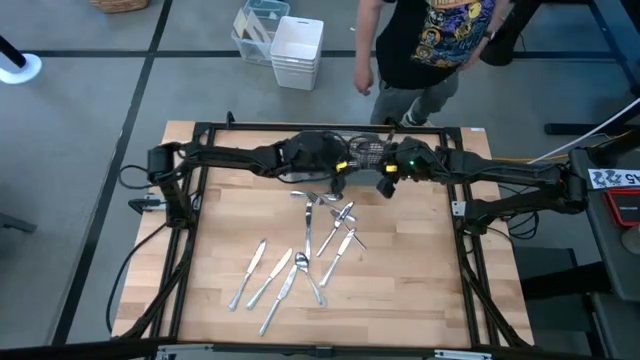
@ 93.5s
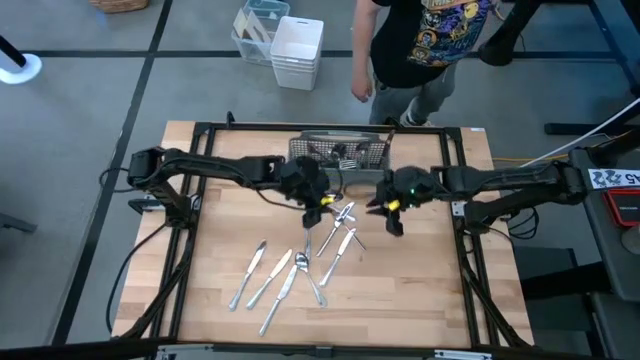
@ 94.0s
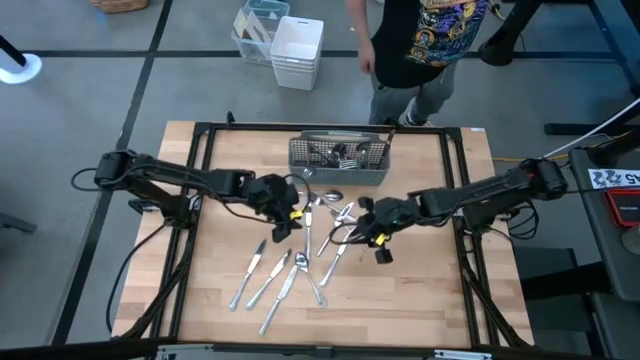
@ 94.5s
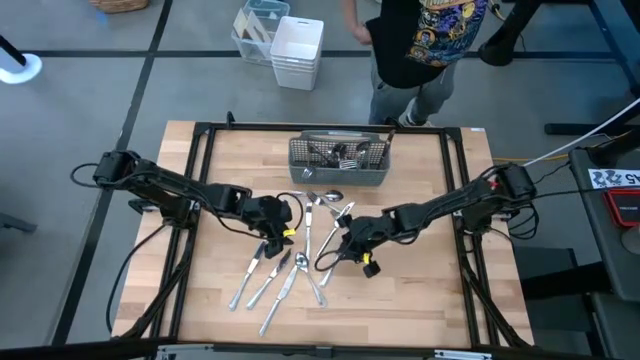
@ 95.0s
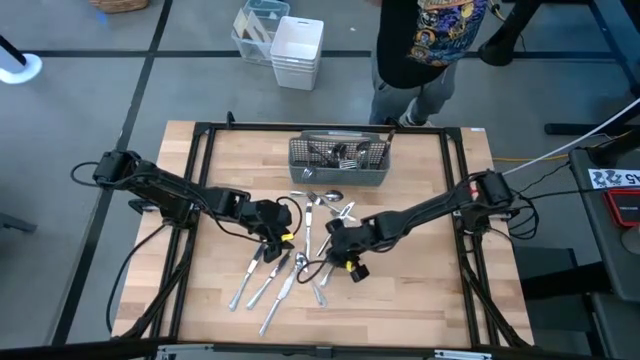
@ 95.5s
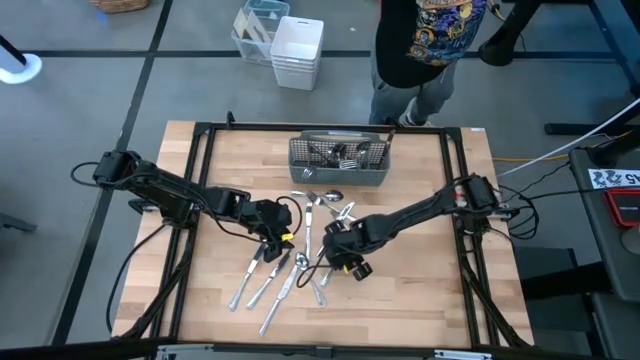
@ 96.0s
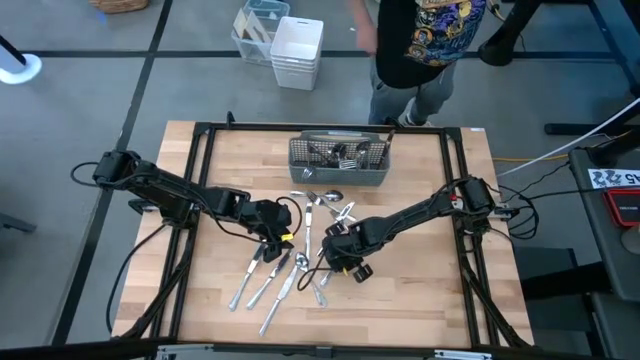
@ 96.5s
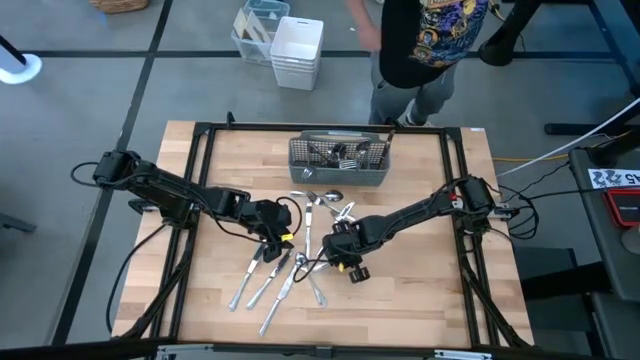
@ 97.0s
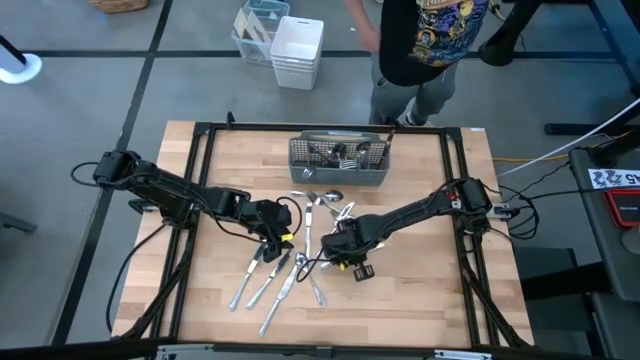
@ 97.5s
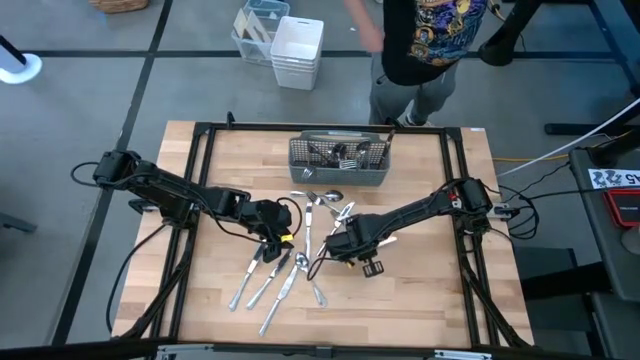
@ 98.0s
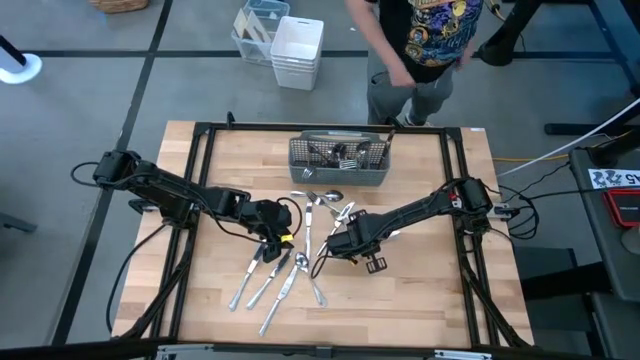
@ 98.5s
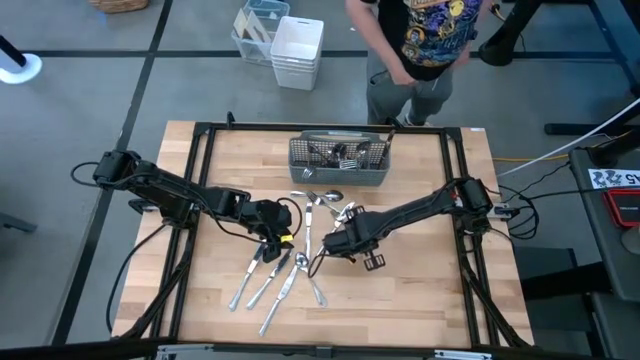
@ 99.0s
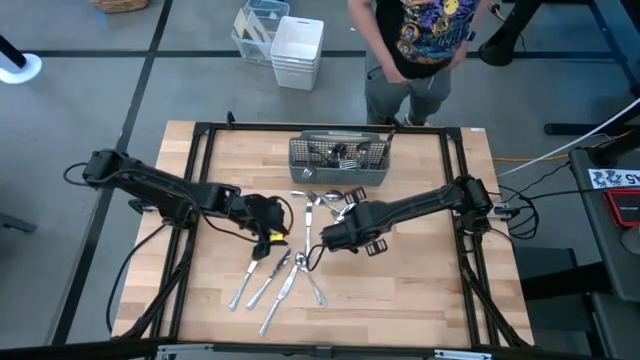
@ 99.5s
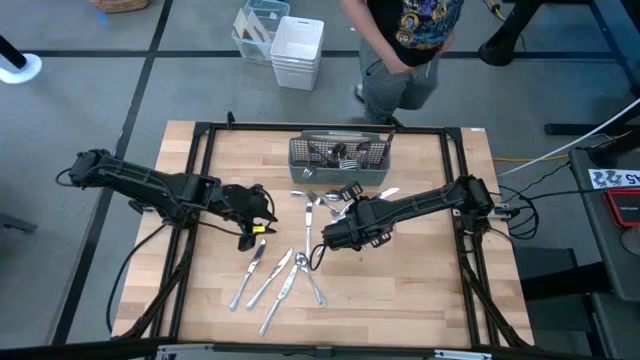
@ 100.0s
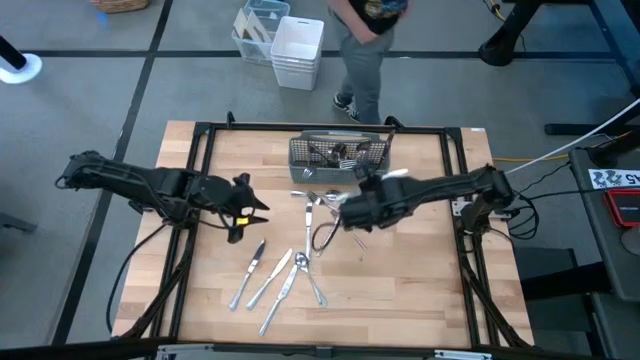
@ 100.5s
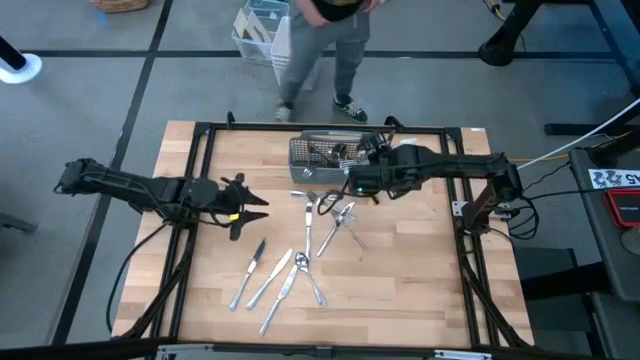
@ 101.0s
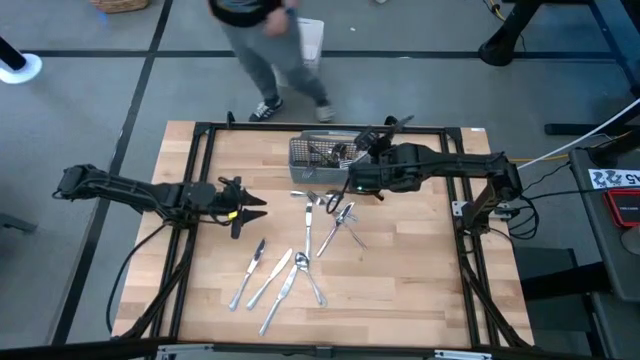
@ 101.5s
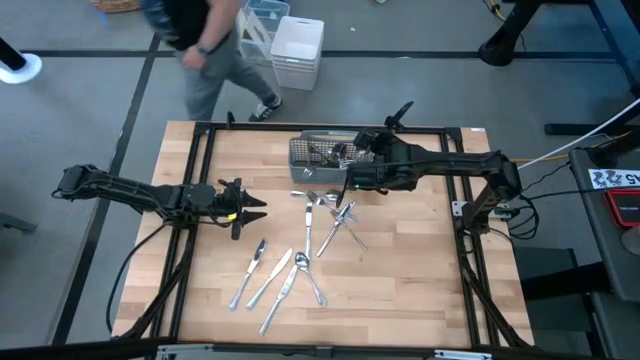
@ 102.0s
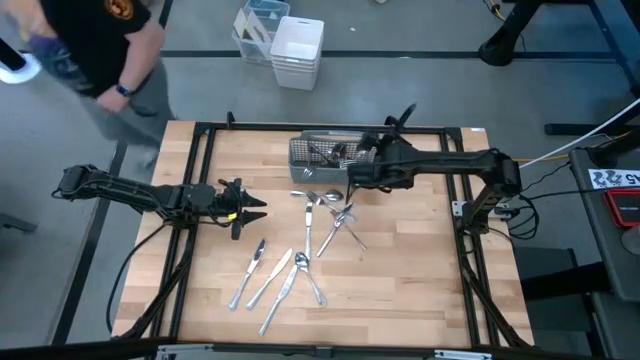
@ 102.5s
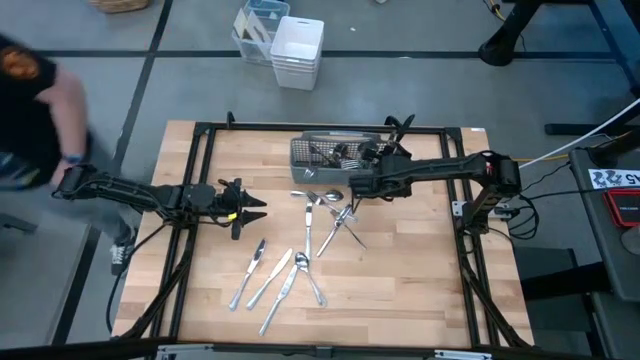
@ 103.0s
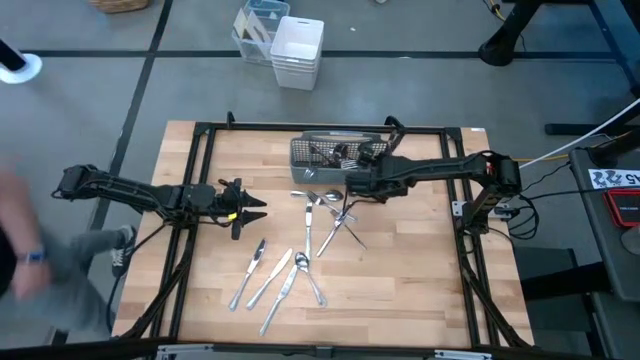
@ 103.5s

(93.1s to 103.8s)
Task: Sort silverware
Put the knife into the silverware rack

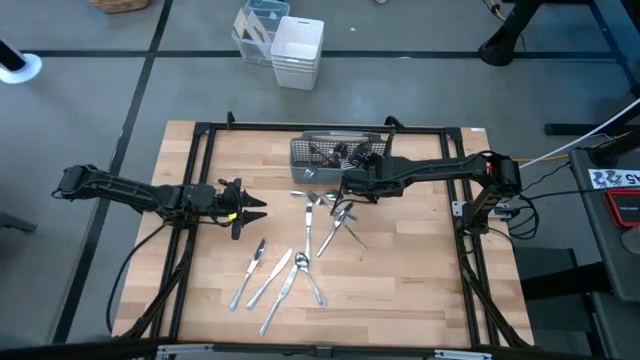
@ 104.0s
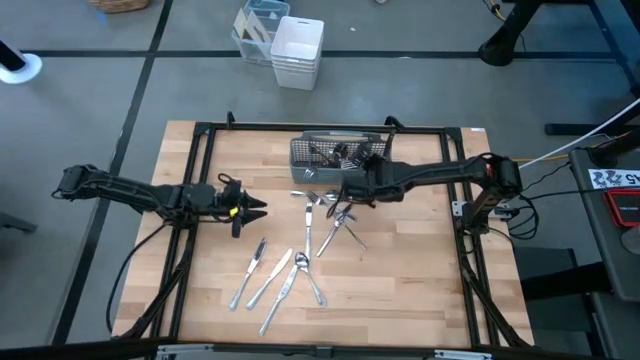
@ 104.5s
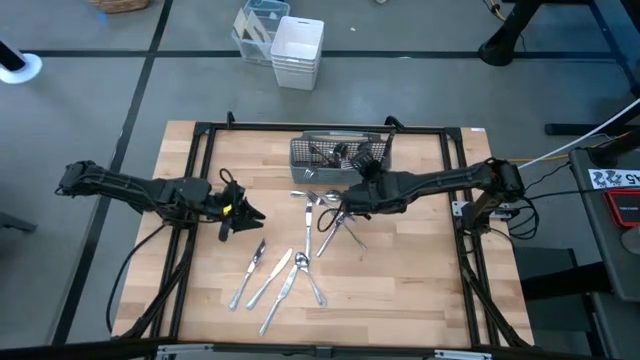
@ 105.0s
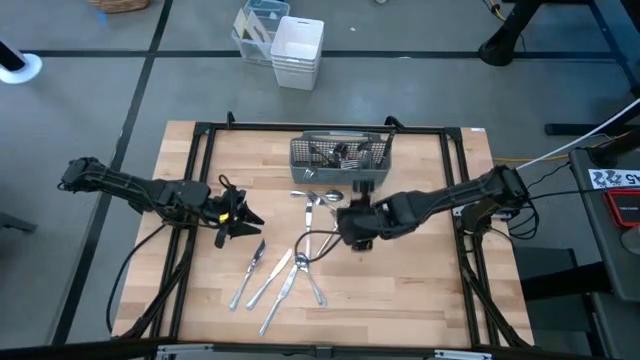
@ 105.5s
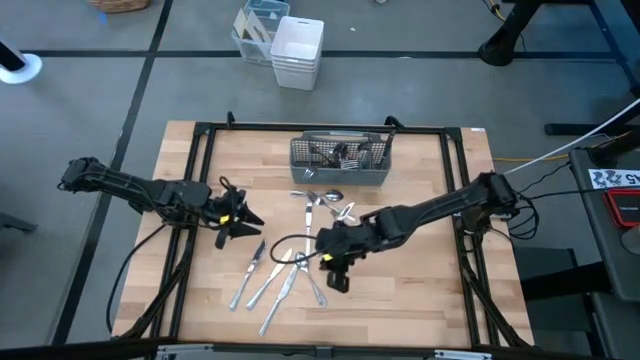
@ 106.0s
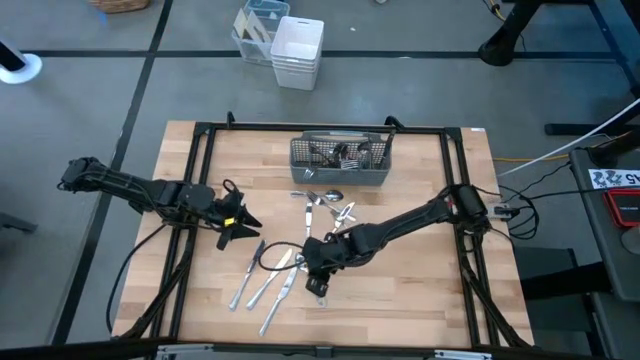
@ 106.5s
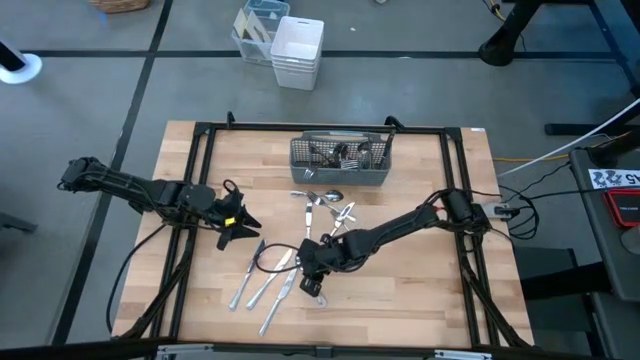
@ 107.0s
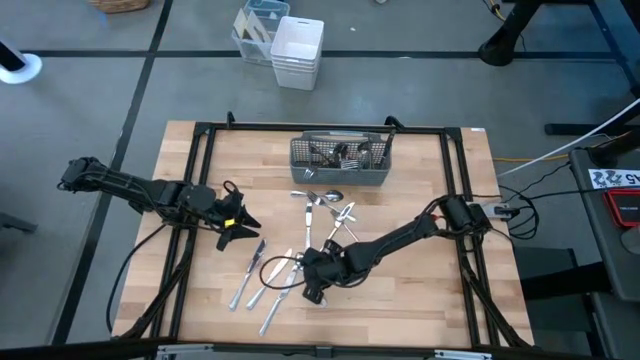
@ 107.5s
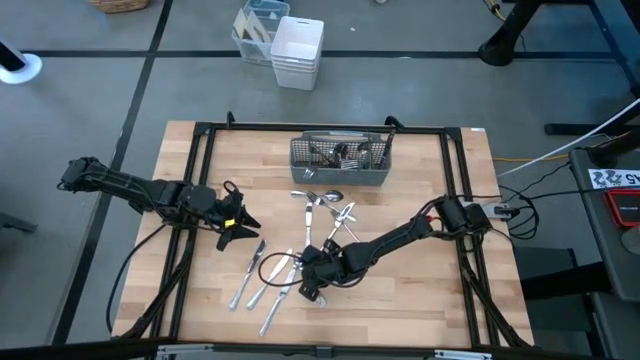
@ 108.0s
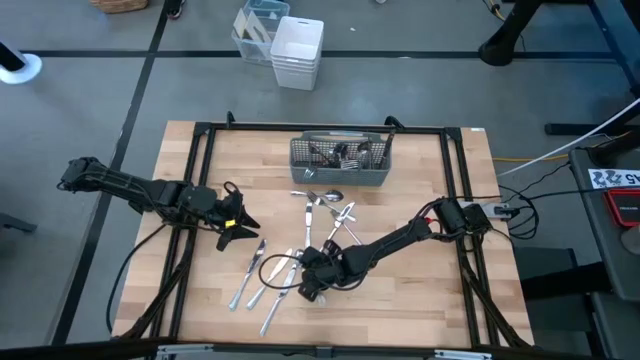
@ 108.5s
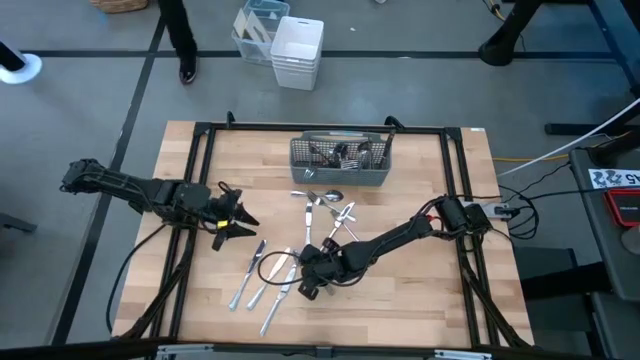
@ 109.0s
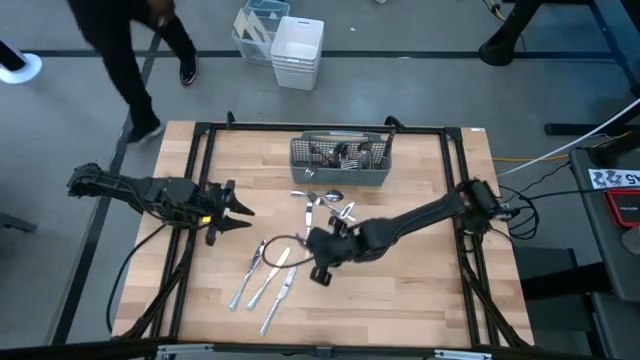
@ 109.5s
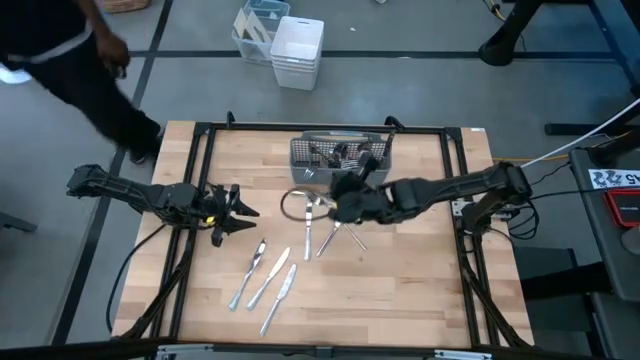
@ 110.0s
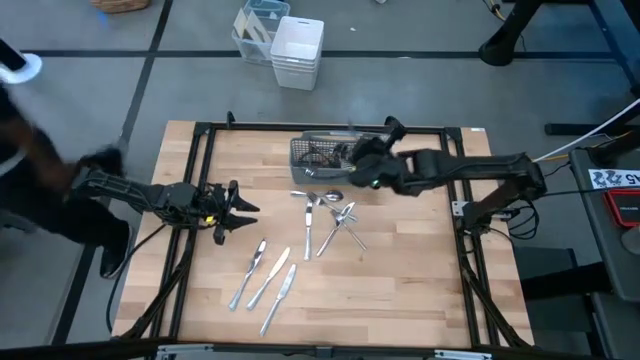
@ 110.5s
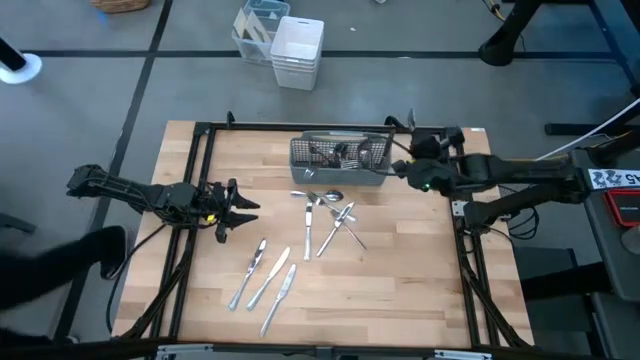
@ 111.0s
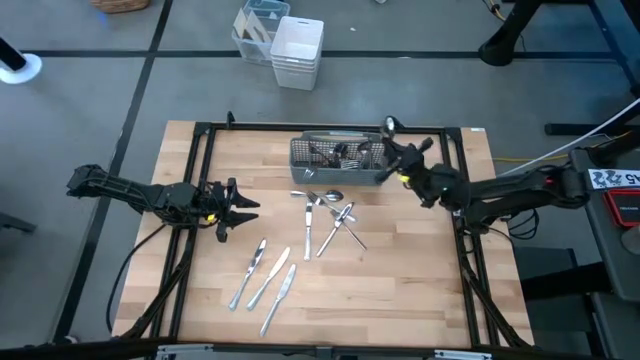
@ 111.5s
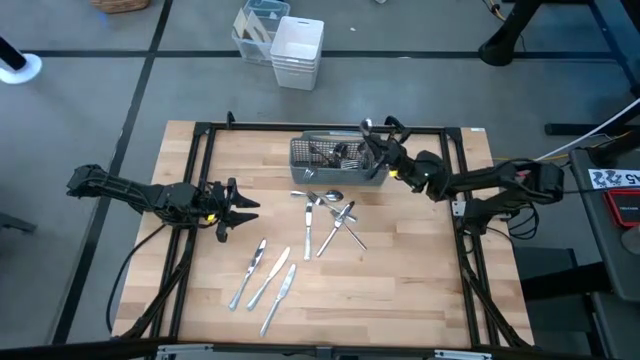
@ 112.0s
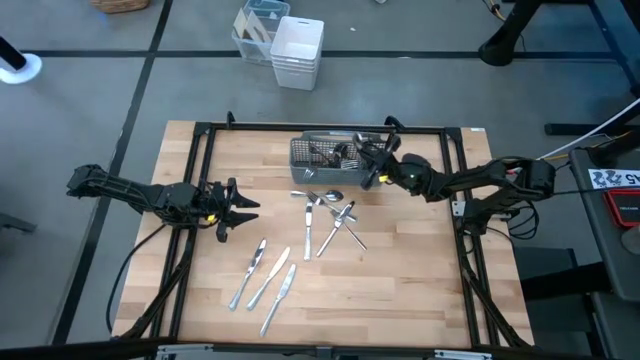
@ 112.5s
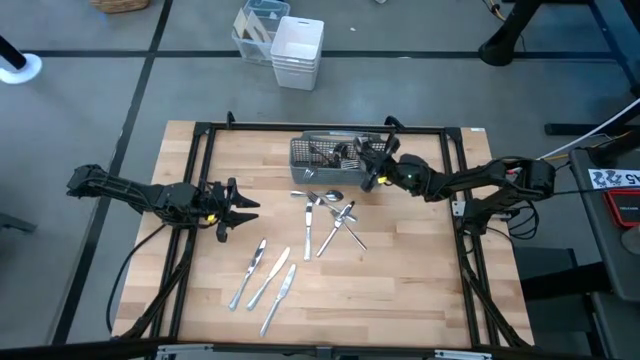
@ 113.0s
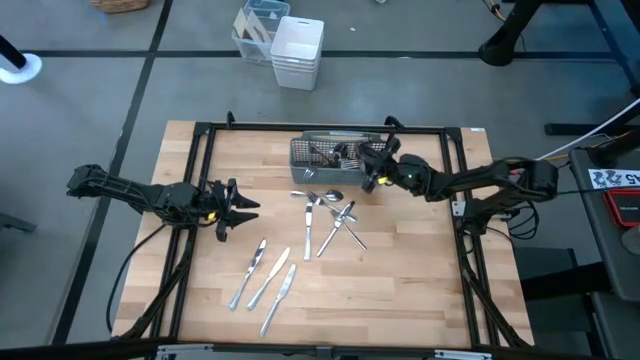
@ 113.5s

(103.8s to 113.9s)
Put the spoon into the silverware rack

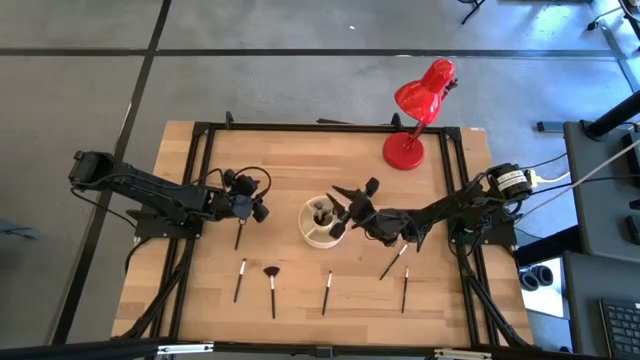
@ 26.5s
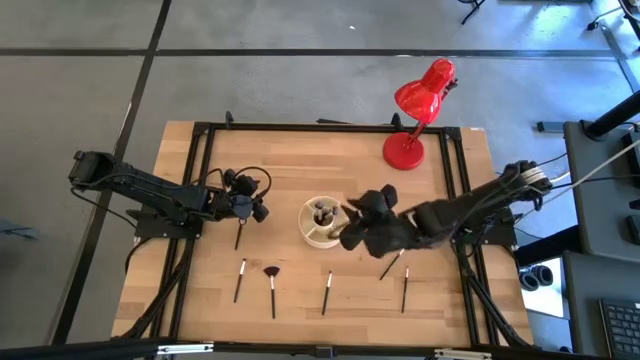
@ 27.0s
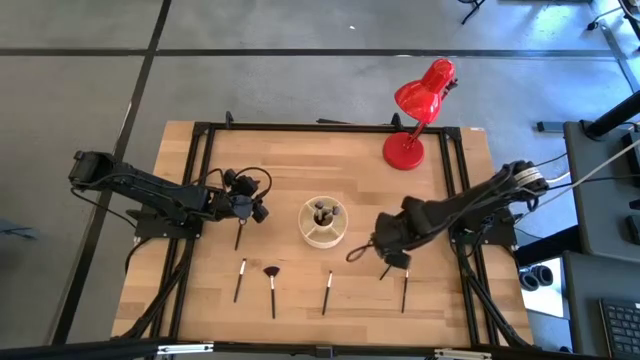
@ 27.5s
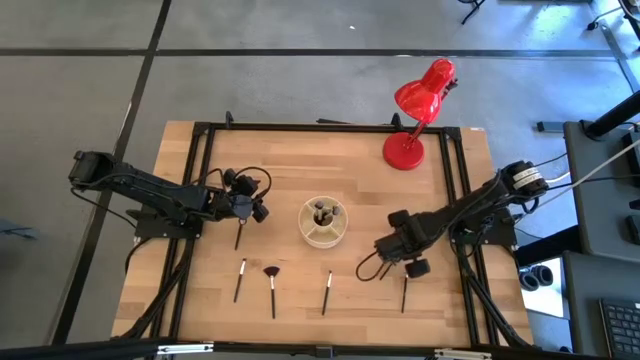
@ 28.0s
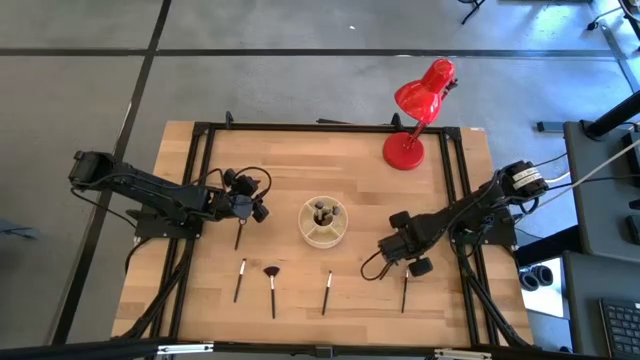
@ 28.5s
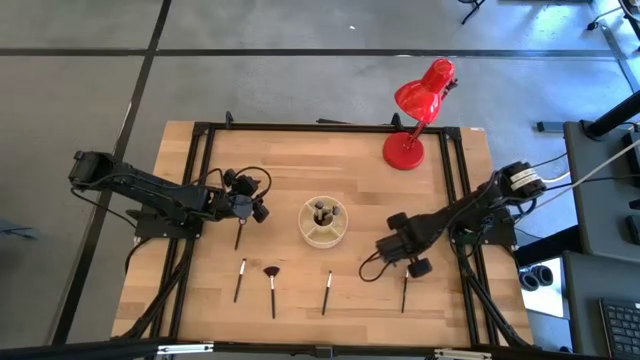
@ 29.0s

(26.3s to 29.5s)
Task: Put items in baskets/containers
Put the black eyeshadow brush into the white brush holder
